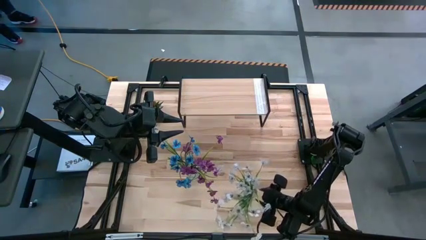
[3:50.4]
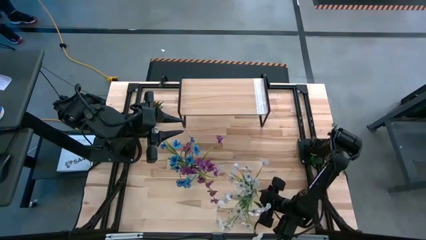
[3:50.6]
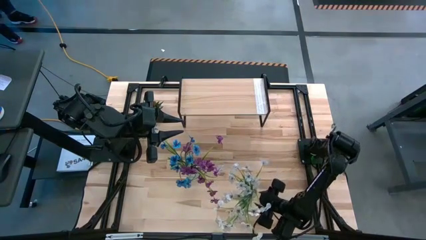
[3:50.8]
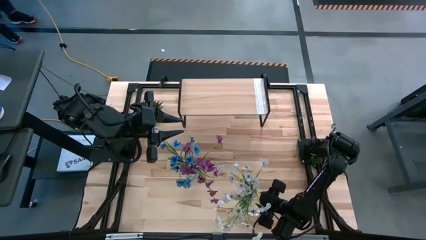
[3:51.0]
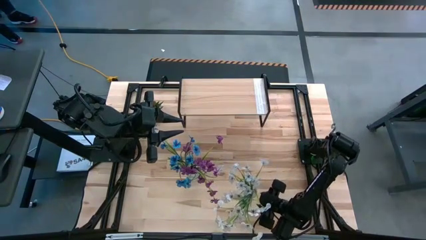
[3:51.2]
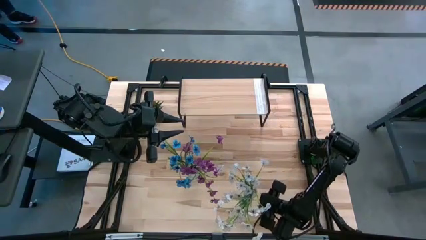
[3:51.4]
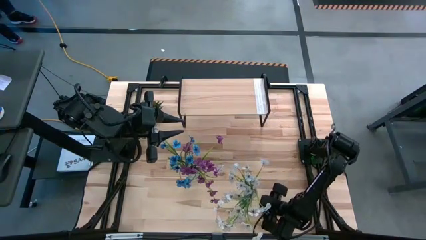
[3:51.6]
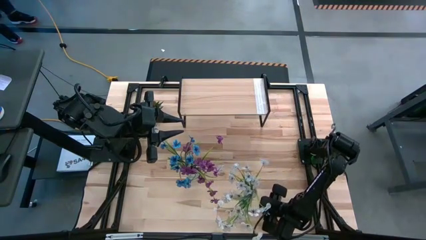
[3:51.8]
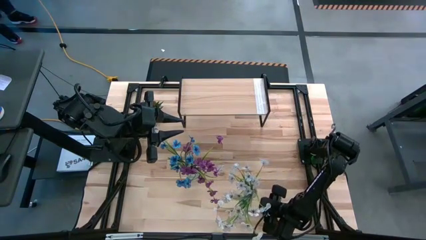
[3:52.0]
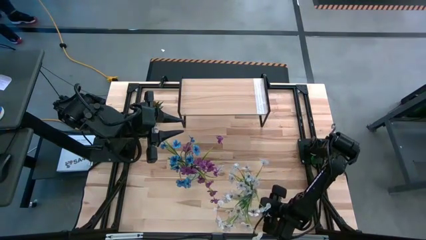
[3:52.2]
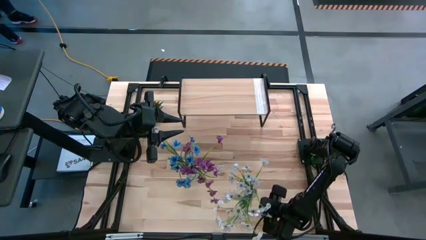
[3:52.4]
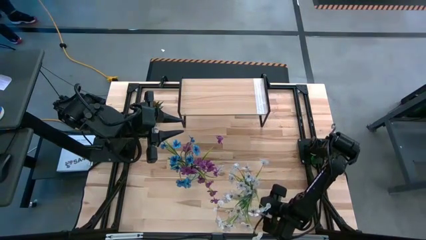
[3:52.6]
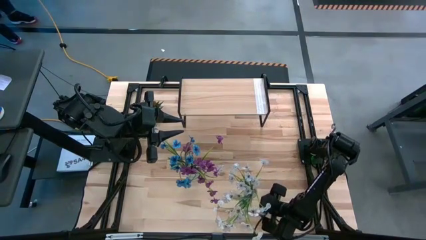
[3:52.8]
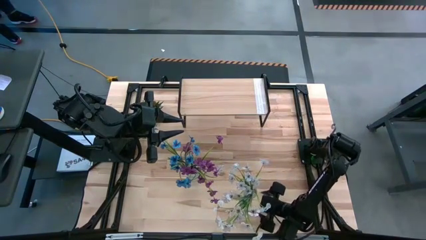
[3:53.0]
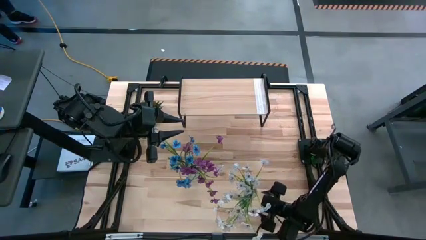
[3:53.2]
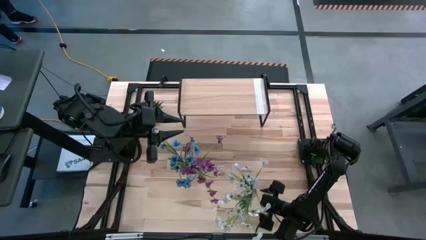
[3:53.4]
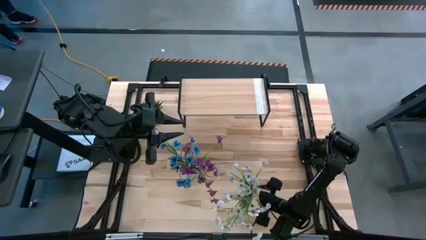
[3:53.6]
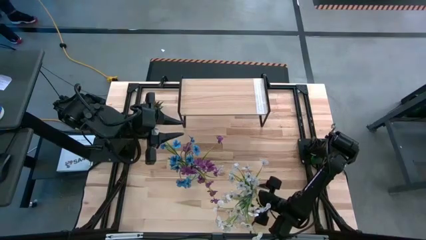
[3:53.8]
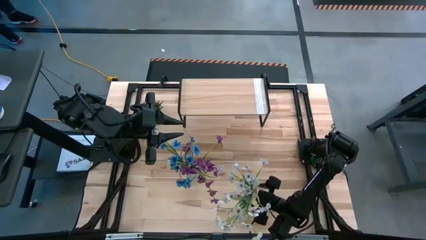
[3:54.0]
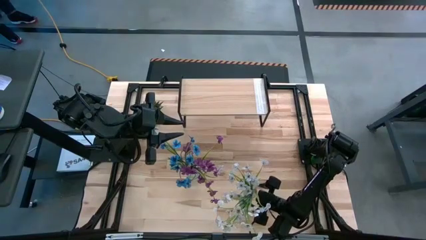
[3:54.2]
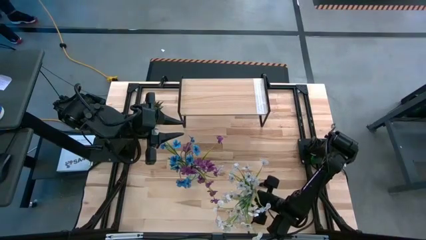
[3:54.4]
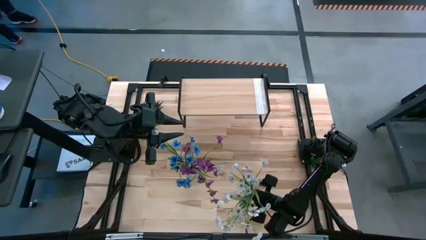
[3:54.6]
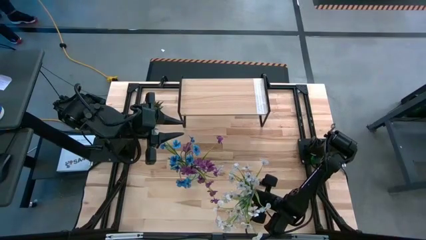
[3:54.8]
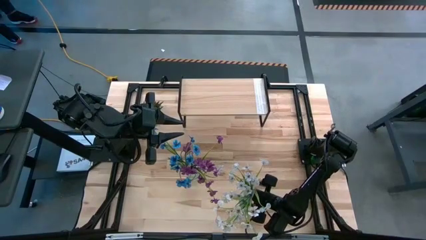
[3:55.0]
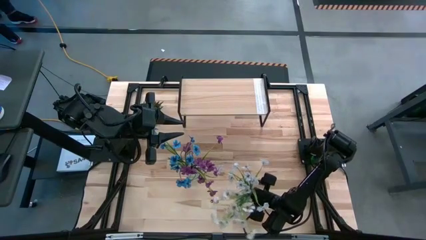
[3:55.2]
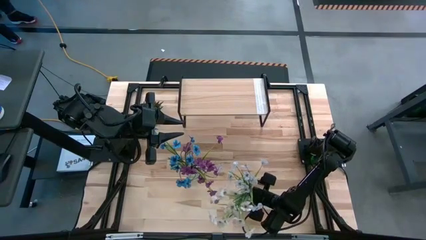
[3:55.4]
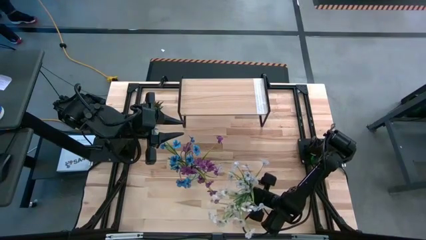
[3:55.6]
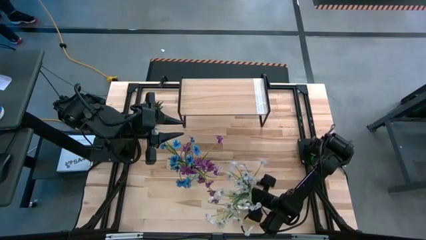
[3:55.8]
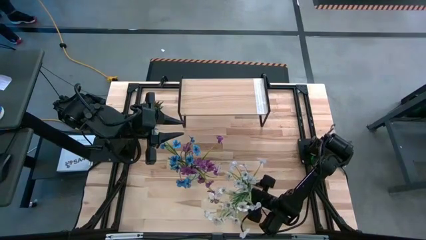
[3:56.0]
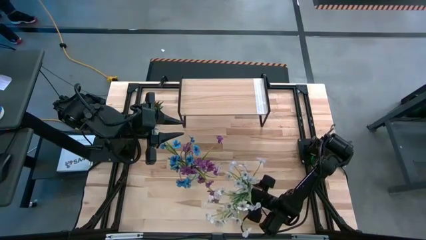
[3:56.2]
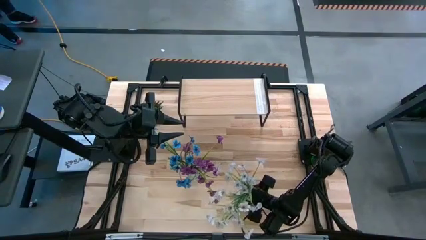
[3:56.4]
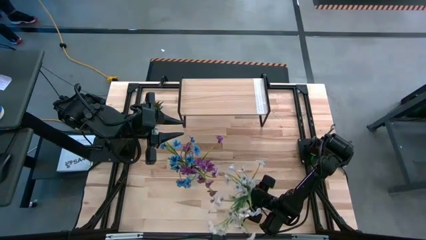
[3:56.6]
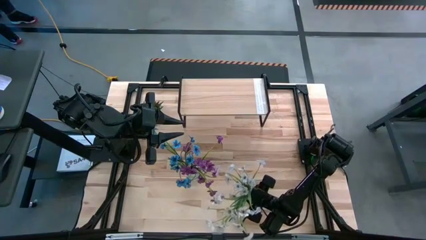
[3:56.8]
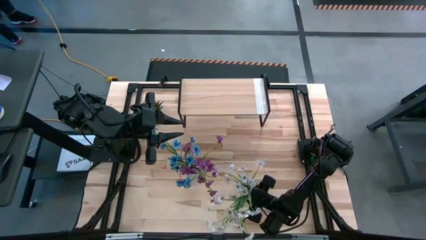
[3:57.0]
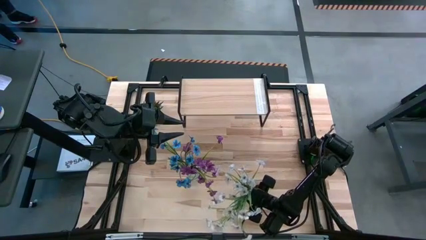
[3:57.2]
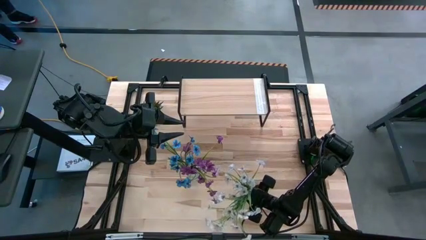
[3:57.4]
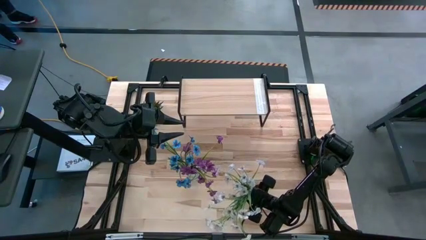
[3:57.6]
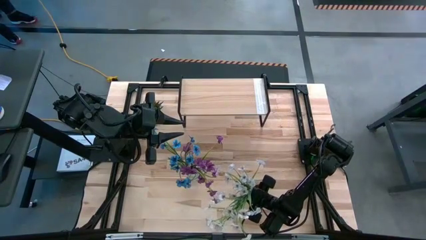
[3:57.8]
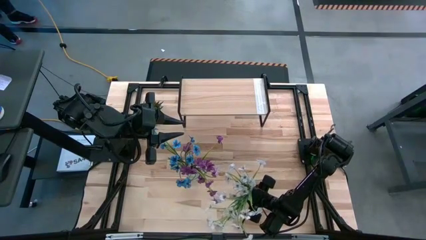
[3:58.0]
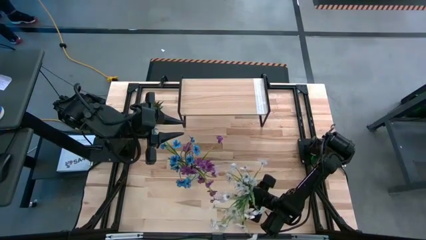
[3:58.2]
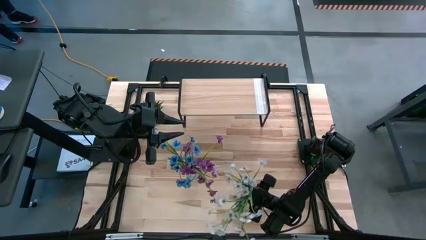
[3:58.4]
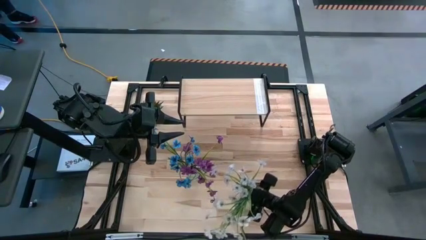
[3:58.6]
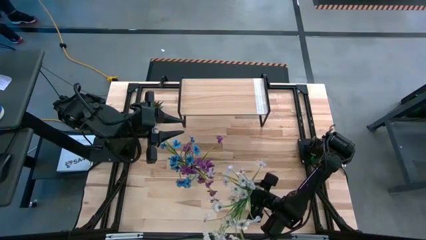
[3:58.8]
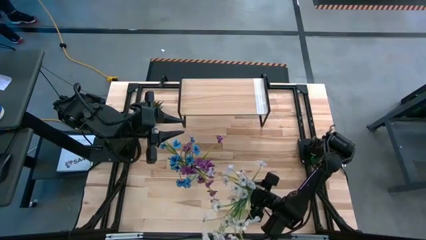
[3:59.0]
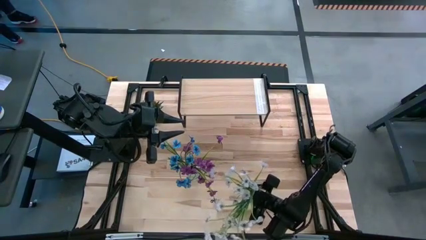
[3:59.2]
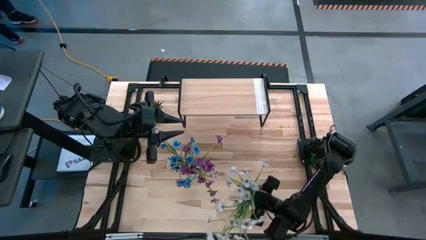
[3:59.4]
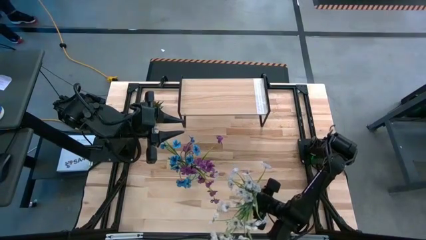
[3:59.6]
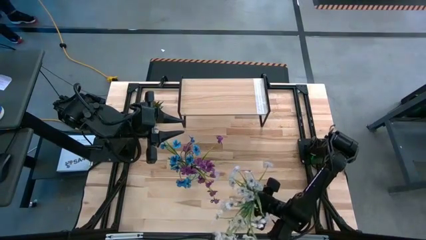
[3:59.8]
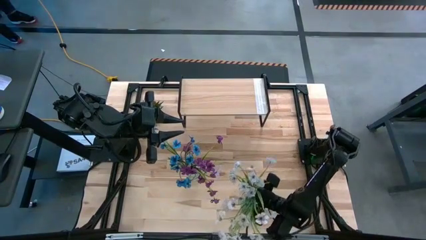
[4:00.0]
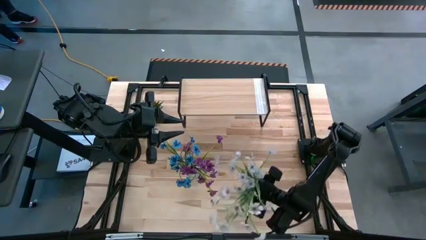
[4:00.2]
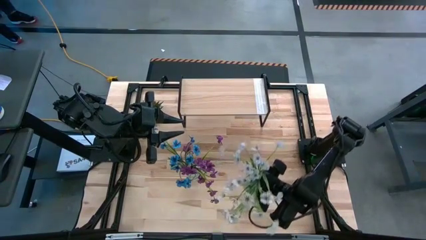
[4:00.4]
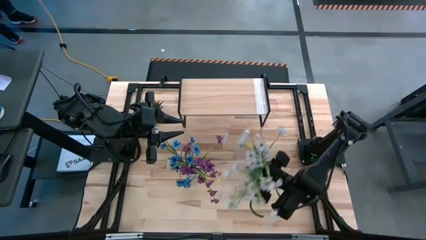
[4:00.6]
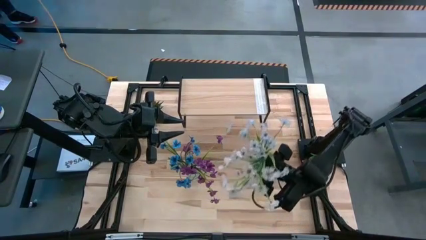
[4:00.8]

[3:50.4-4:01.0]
Task: Pick and place flowers into a vace then onto a shelf
Put the right transparent vase with flowers on the shelf

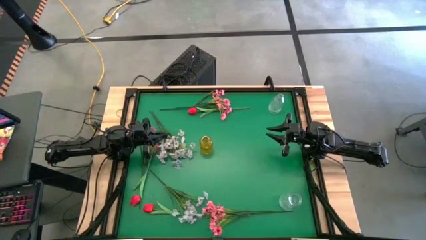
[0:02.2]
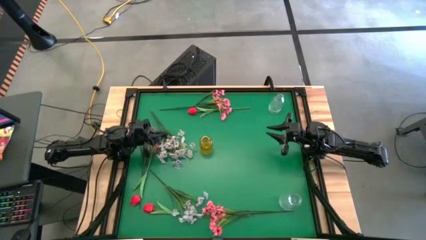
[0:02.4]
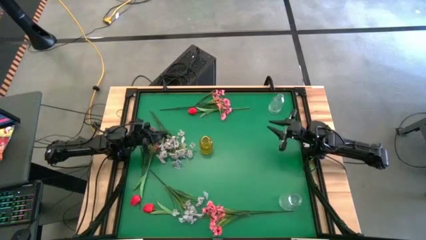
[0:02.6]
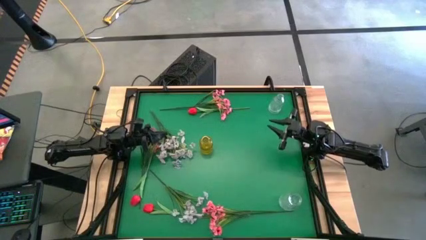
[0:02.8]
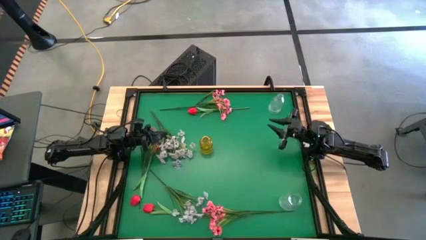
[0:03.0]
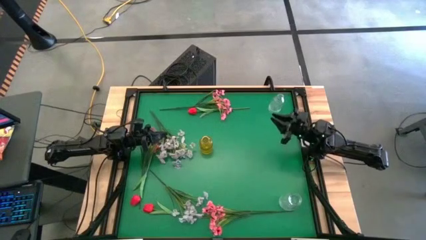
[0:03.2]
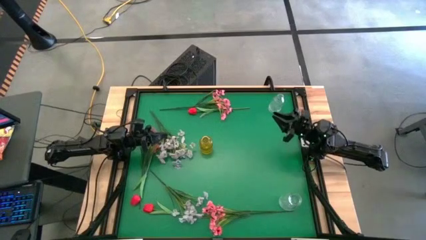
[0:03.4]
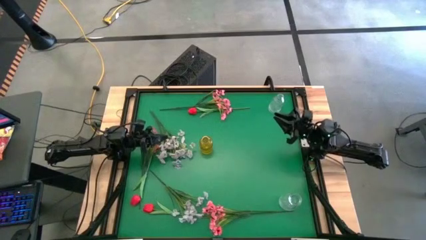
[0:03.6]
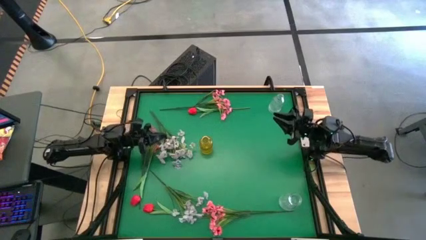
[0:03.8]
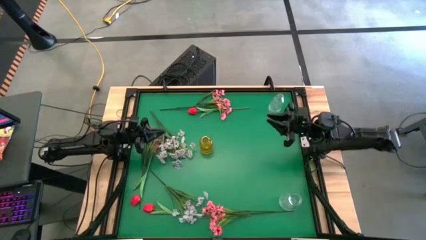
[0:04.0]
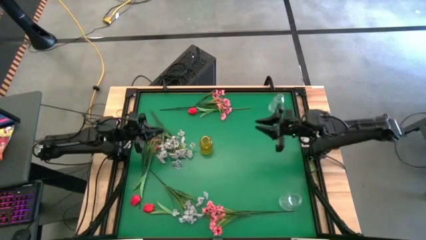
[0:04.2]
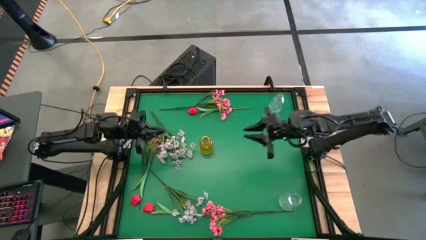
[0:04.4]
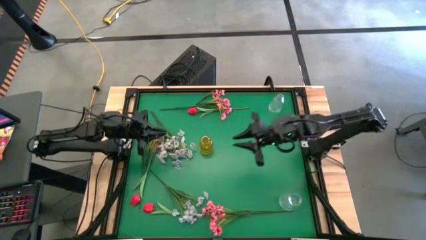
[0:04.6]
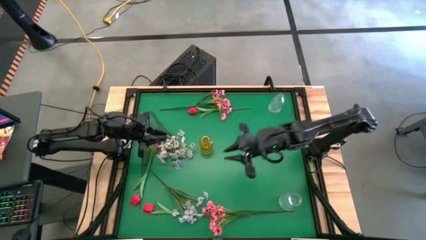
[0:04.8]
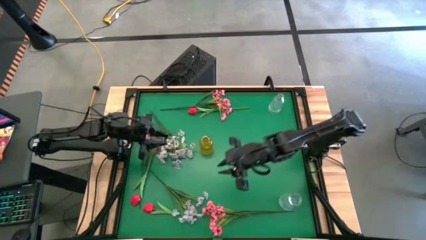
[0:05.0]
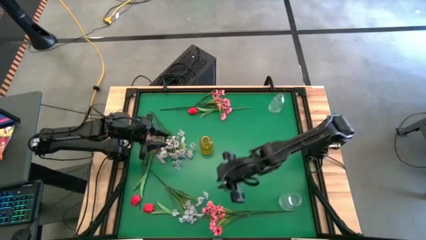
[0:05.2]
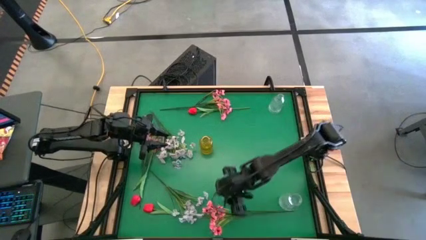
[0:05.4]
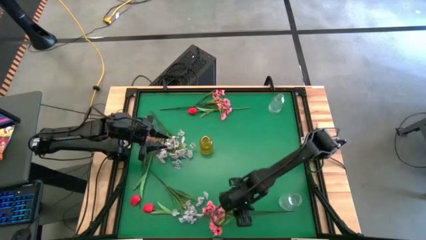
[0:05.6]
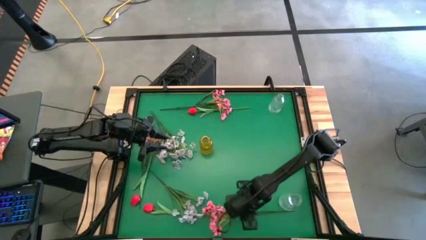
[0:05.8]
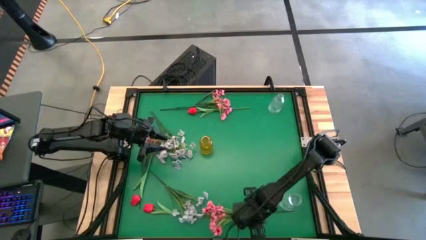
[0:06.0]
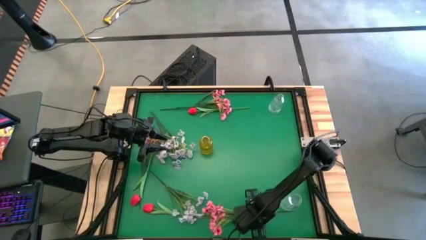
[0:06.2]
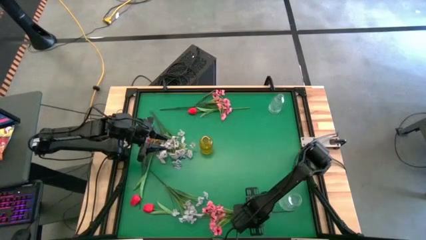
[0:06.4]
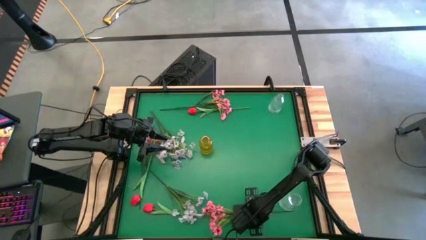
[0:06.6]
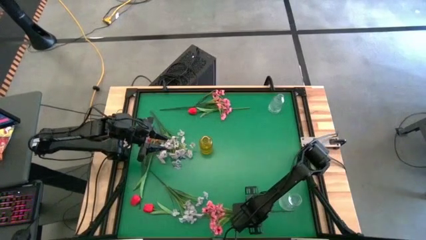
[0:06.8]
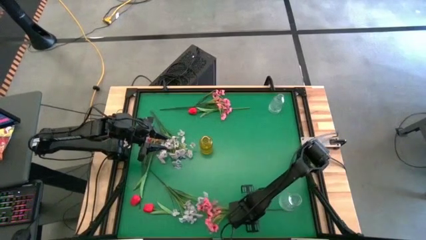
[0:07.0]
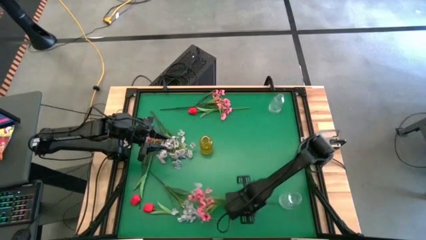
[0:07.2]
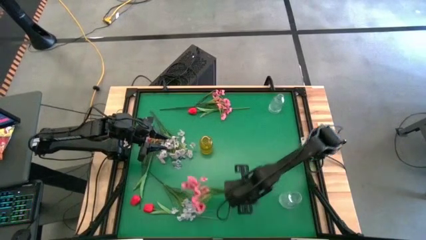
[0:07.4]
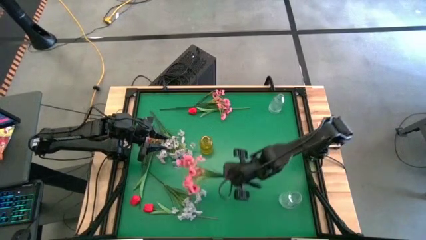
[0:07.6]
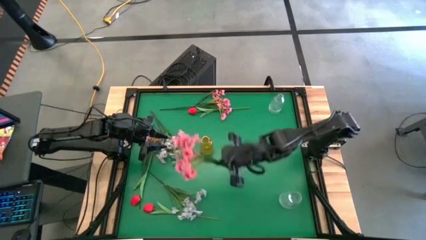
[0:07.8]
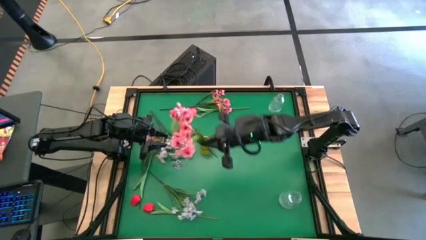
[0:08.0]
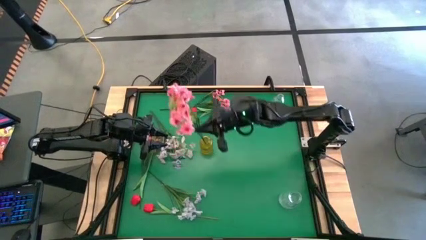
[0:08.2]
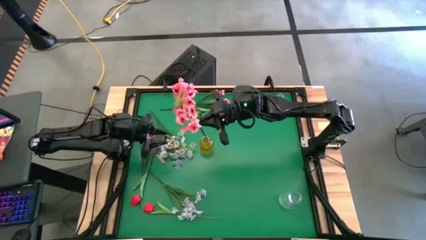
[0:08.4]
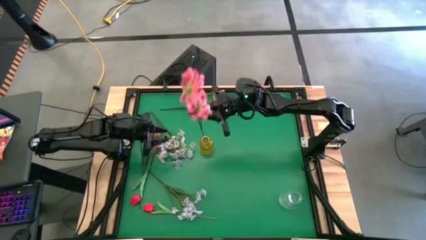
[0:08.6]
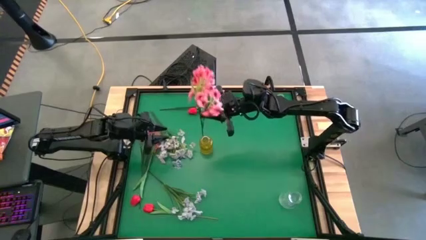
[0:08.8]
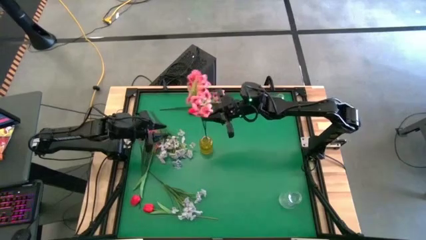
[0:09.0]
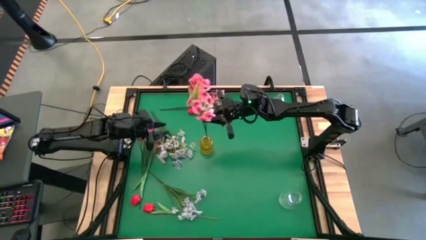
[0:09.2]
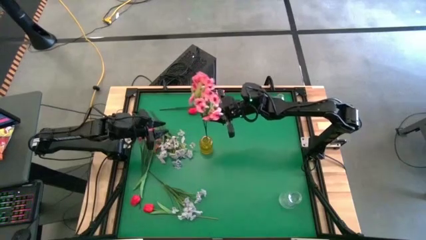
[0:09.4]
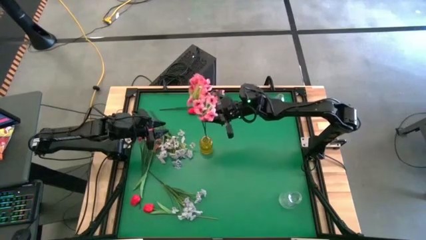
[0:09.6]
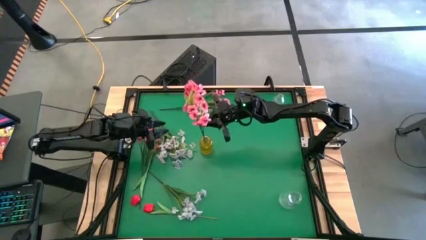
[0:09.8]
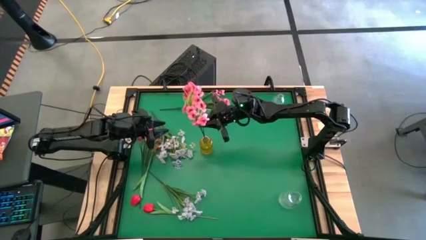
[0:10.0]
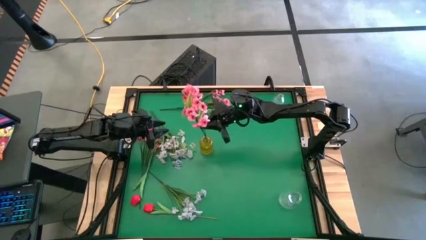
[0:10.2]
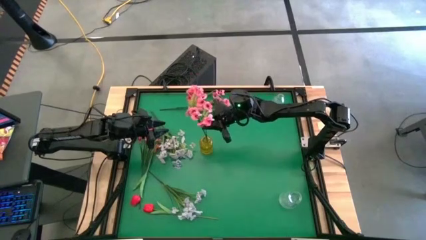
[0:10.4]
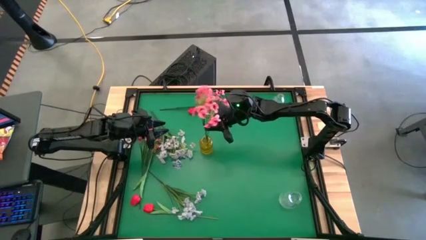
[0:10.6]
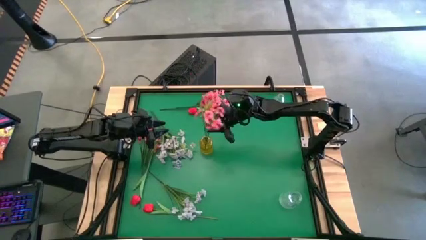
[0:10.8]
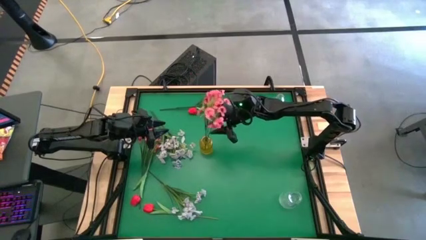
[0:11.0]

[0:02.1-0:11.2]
Task: Sort flowers into vase by color
Put the pink flowers into the yellow vase
